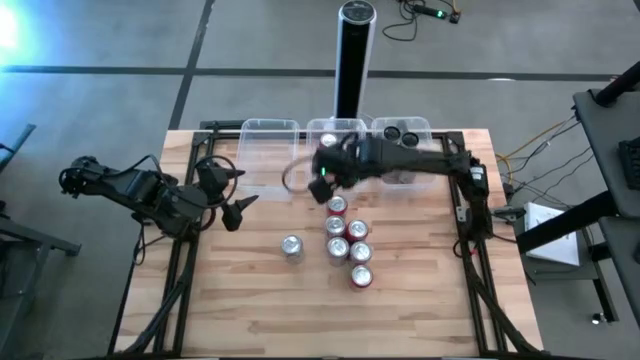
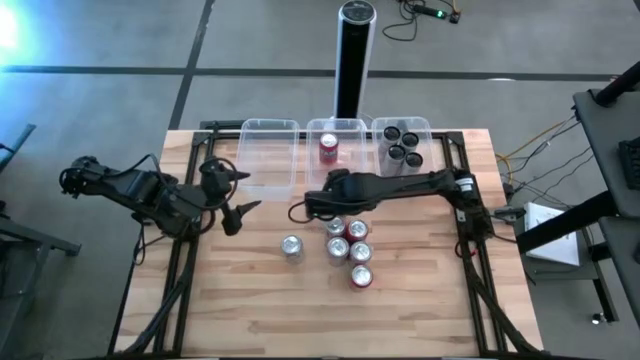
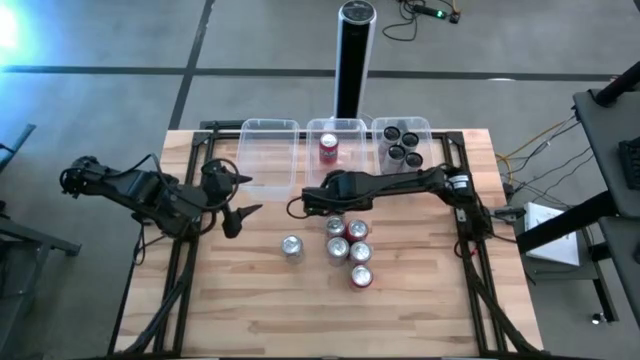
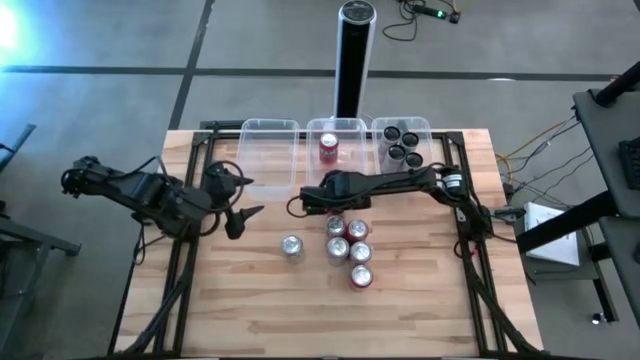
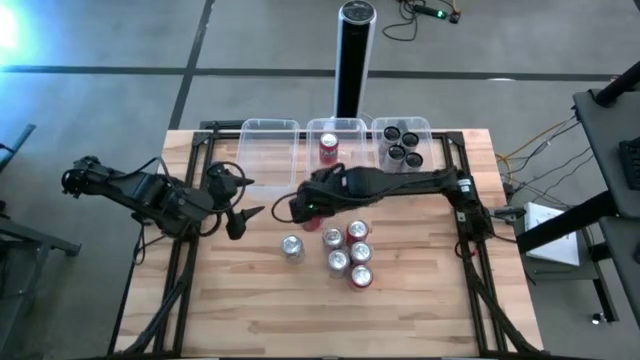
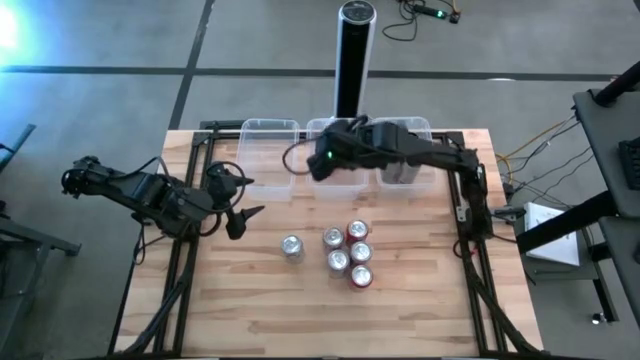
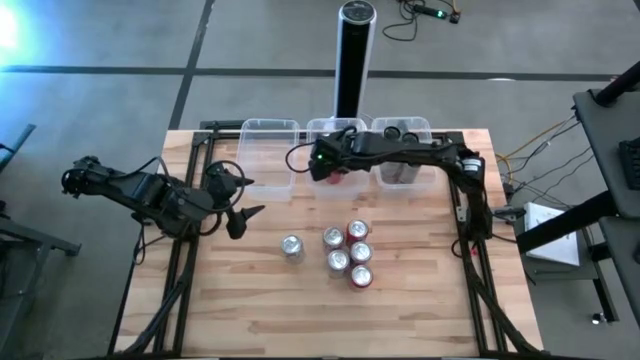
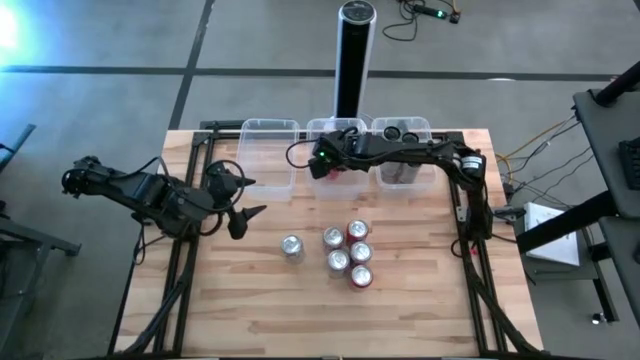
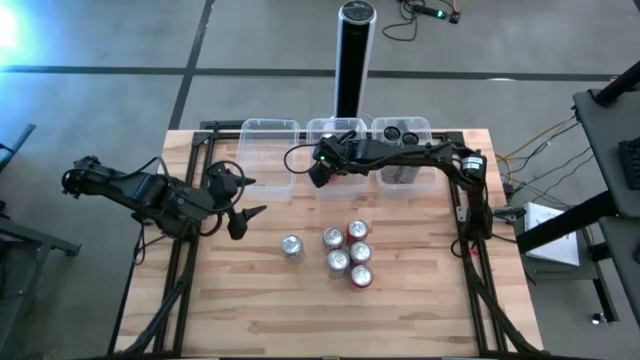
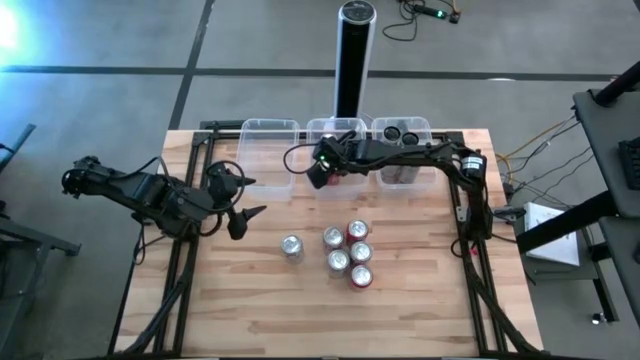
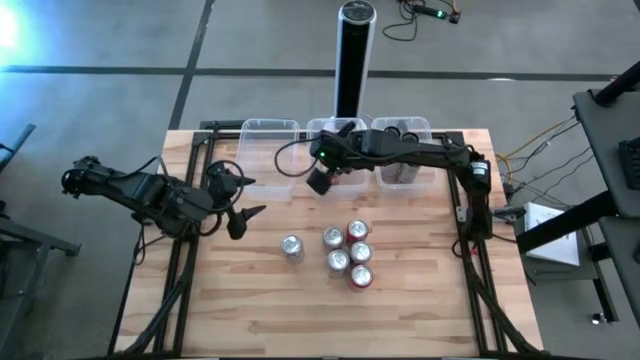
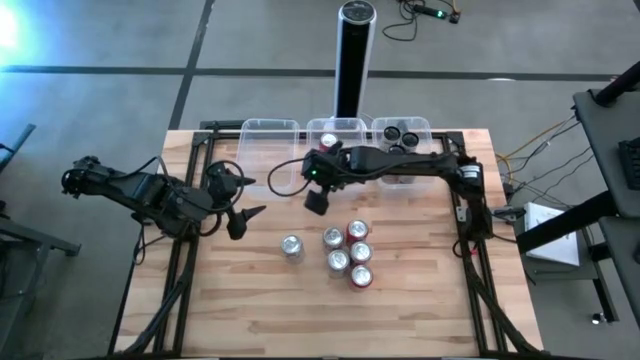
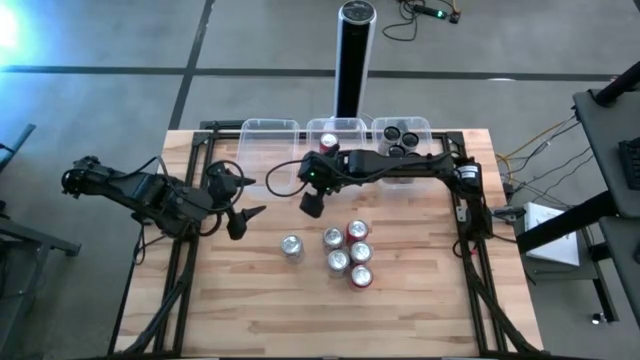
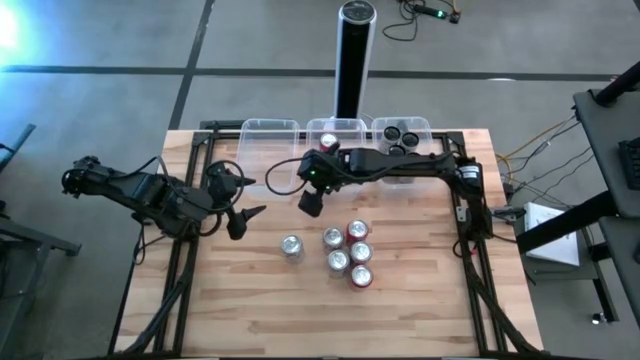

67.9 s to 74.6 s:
Task: Sort soda cans
Put the red soda can into the middle white bin

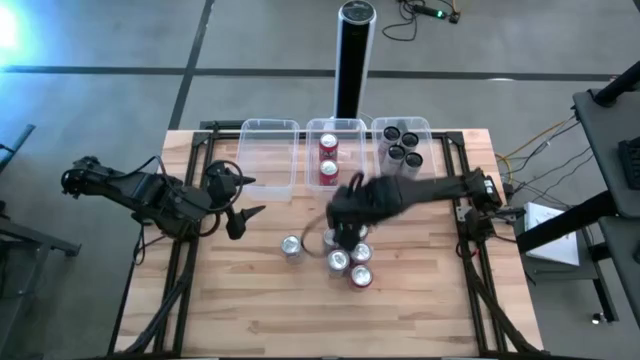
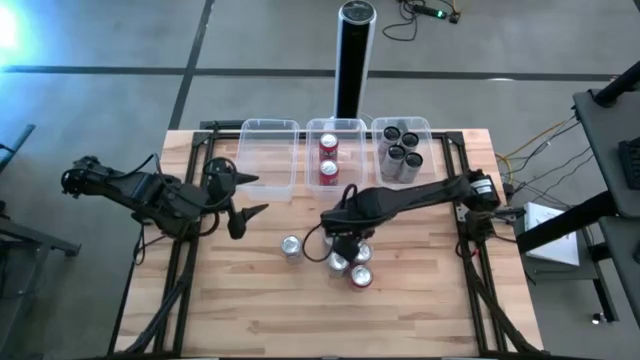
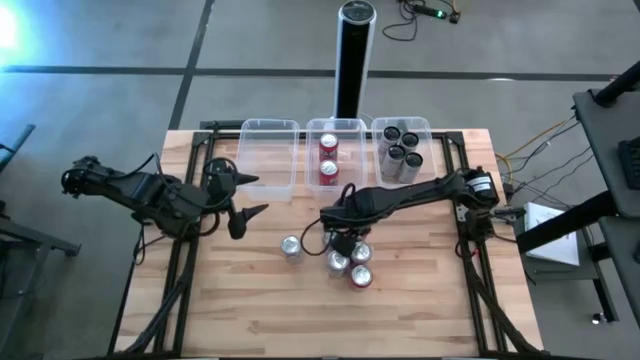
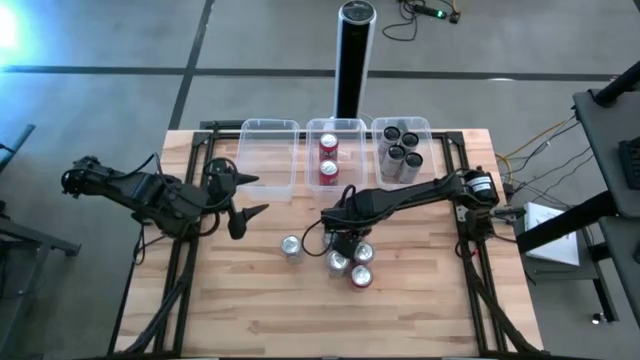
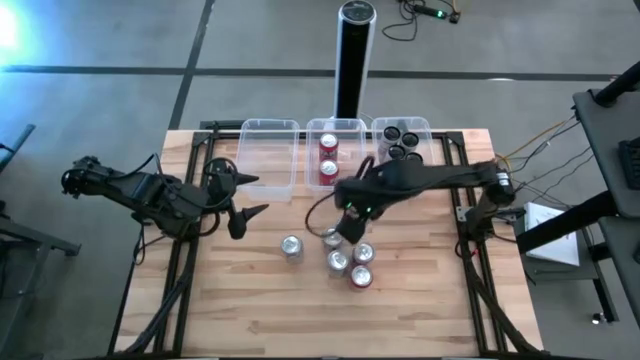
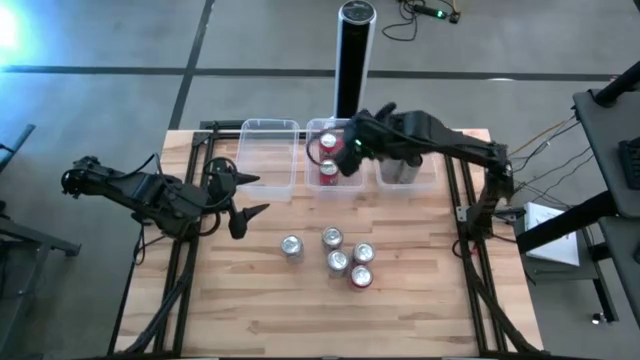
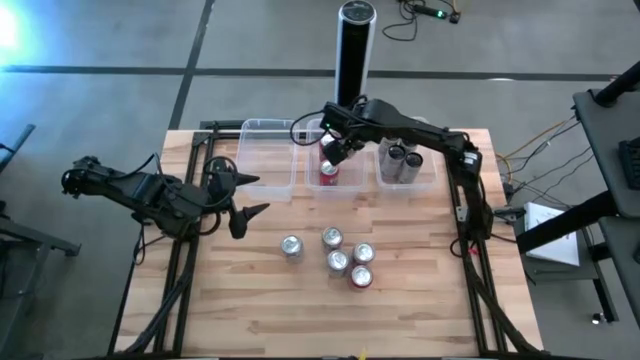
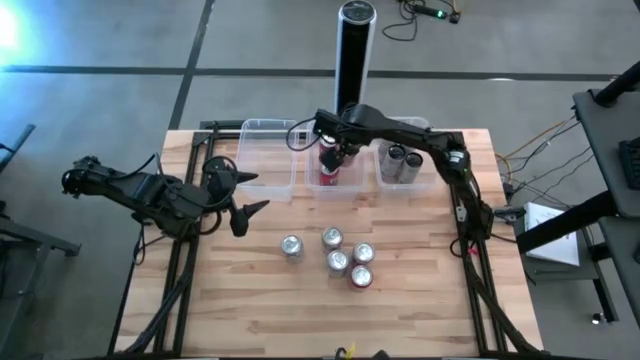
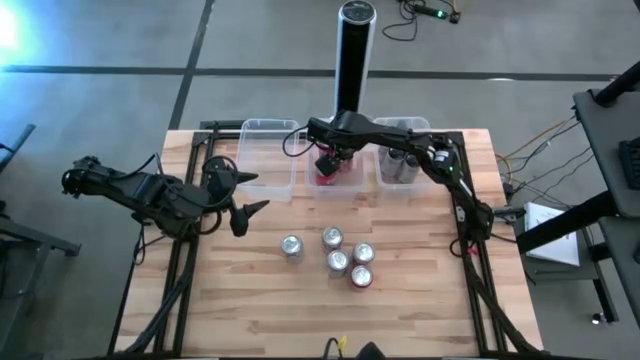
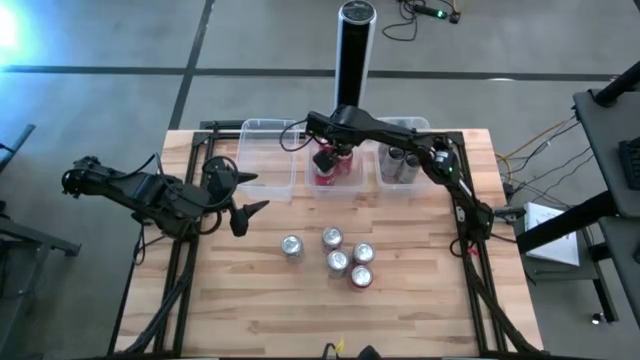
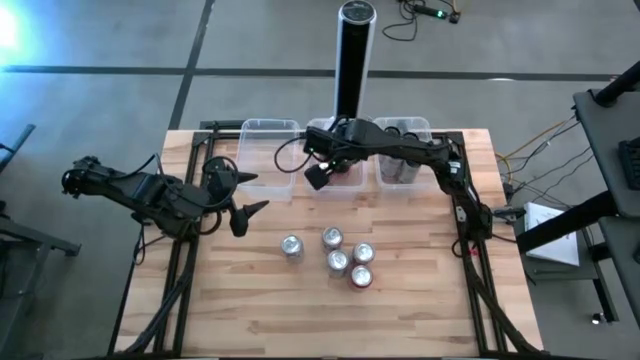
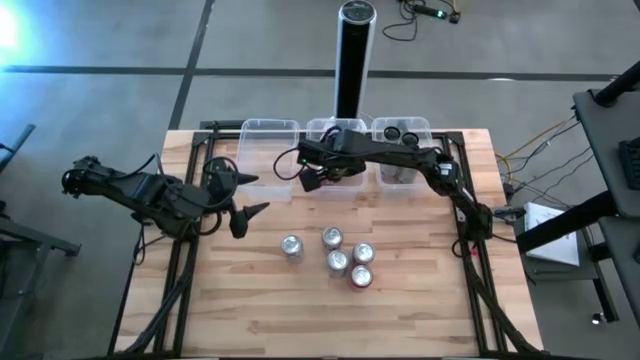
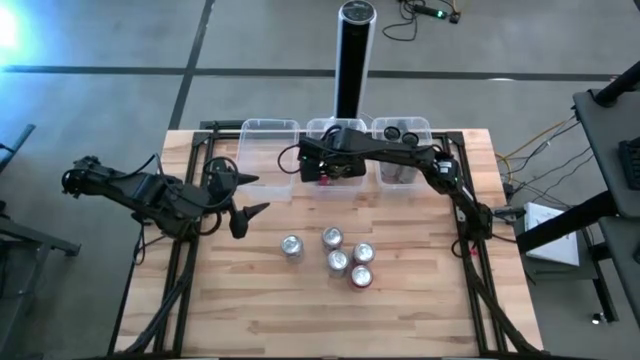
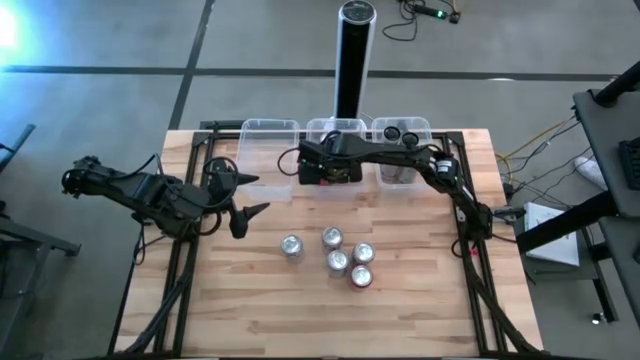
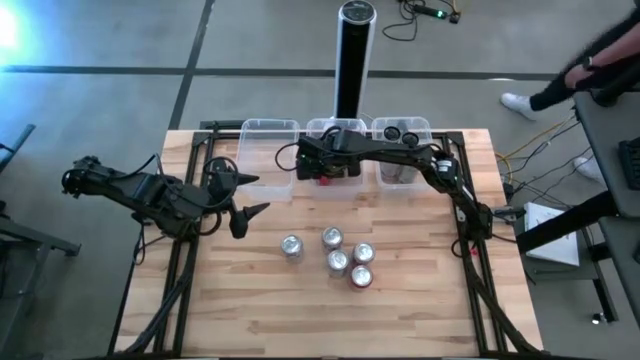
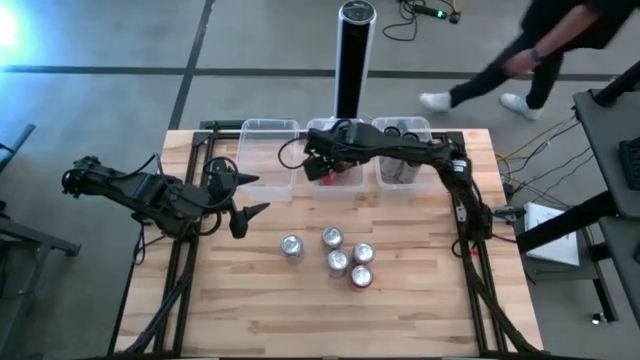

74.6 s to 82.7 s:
Put the red soda can into the middle white bin

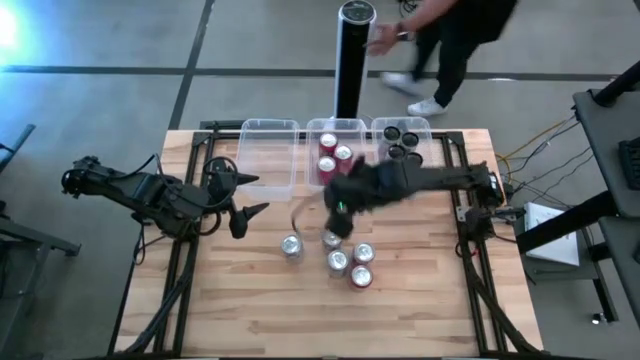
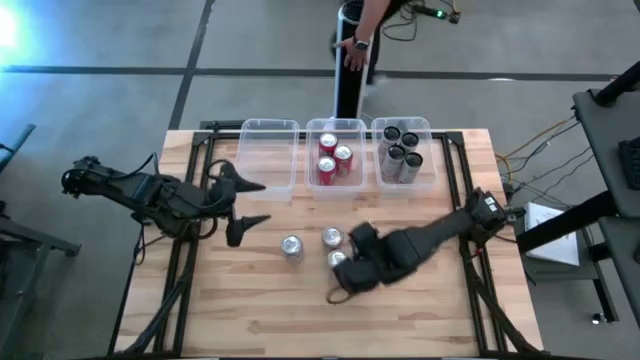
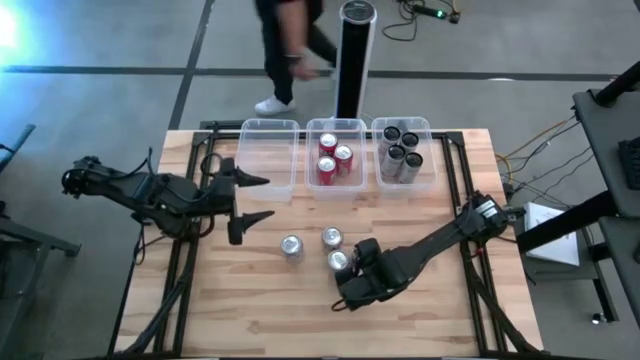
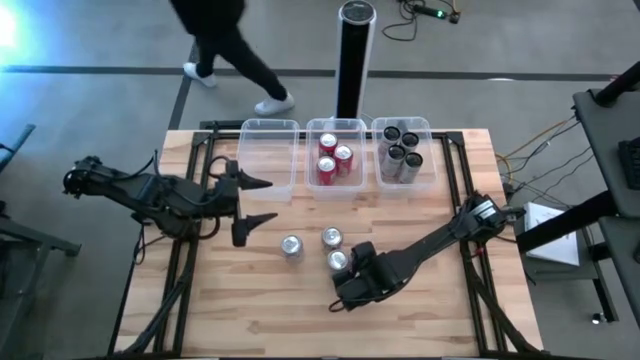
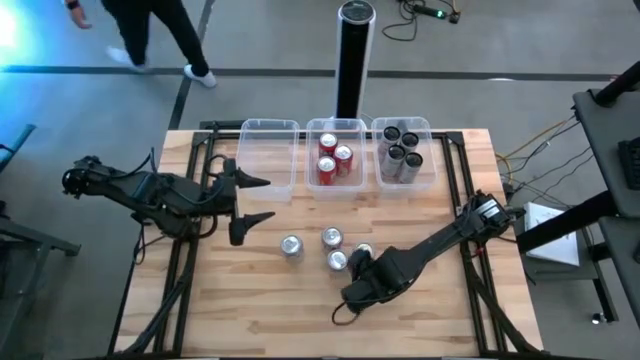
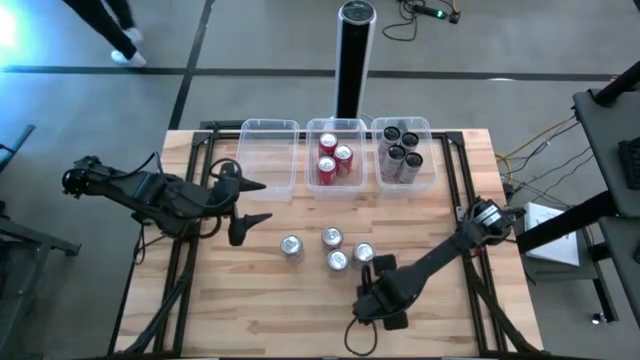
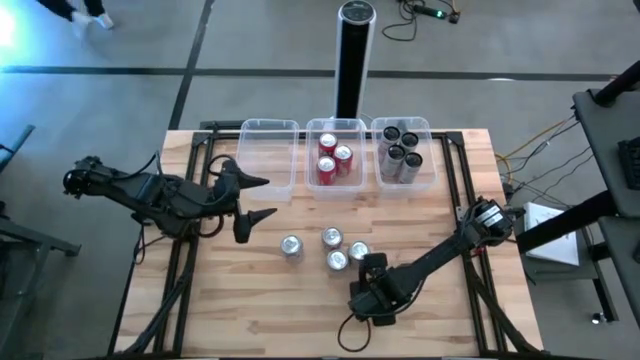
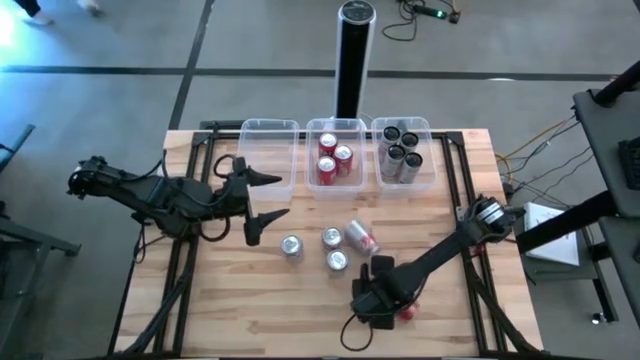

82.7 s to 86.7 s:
Put the red soda can into the middle white bin
